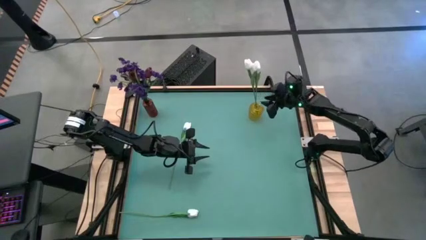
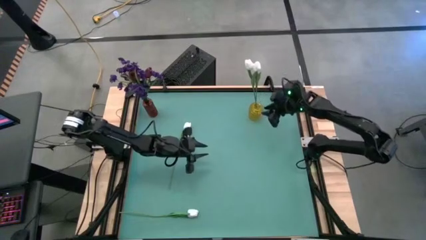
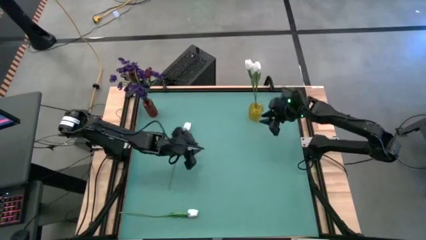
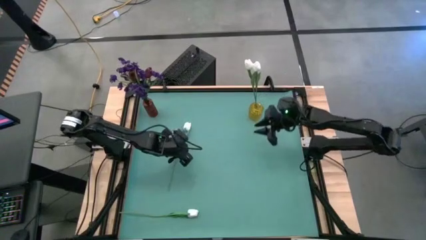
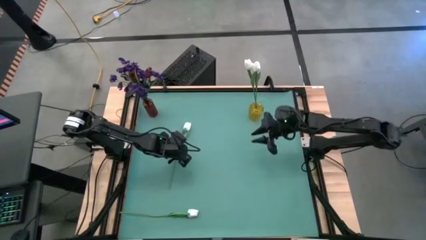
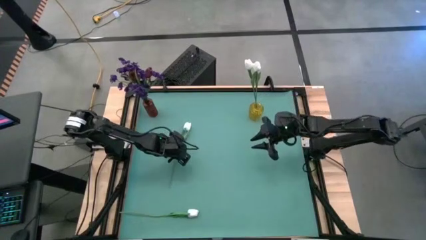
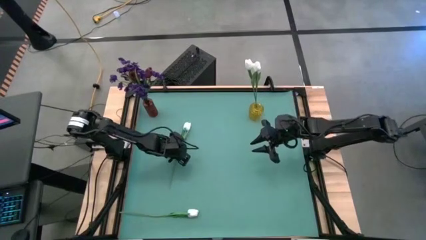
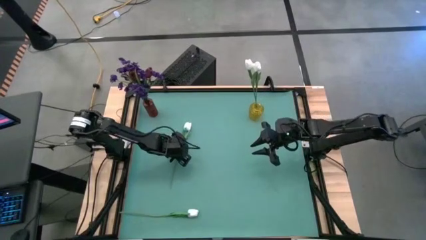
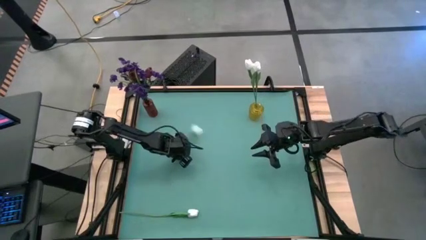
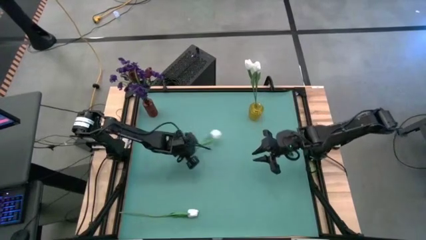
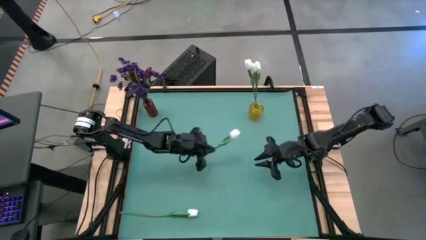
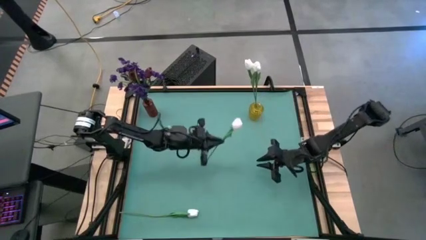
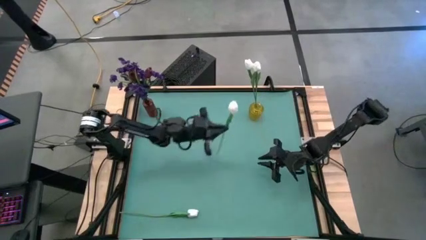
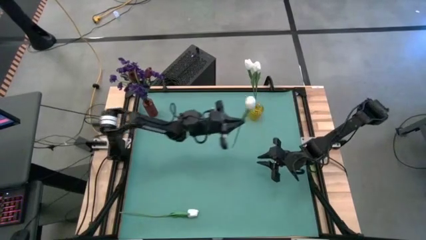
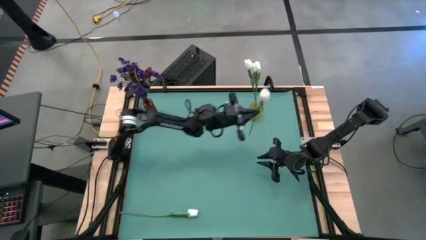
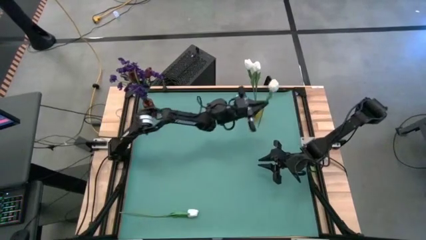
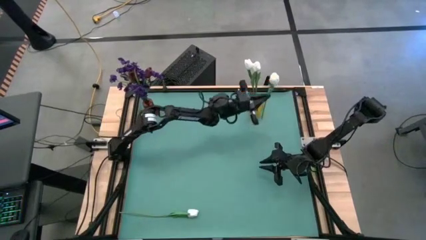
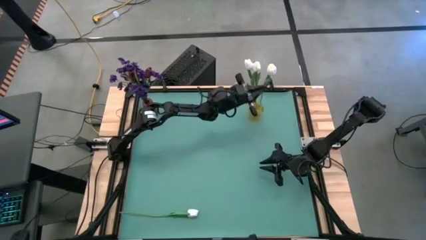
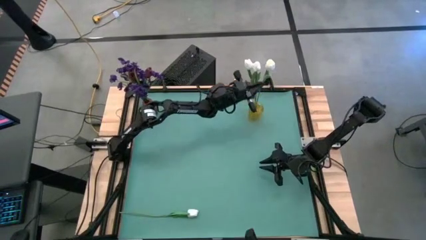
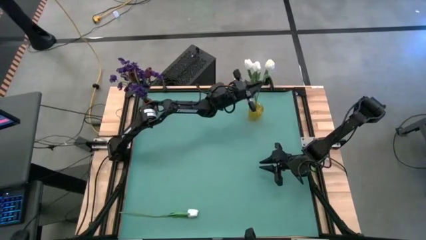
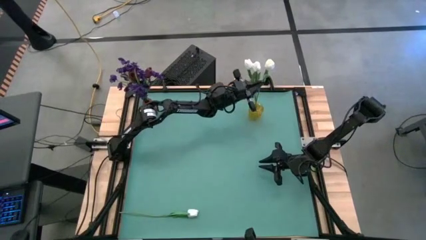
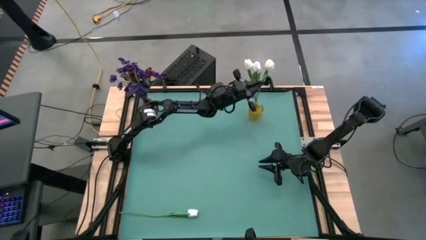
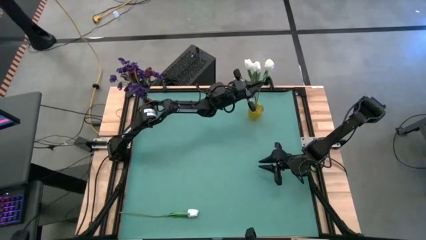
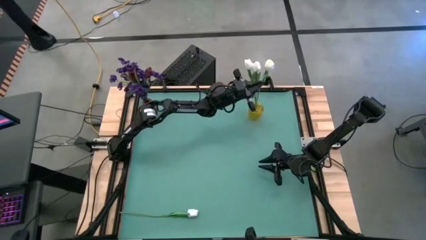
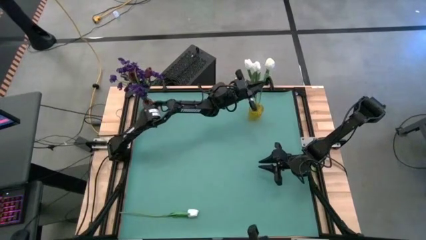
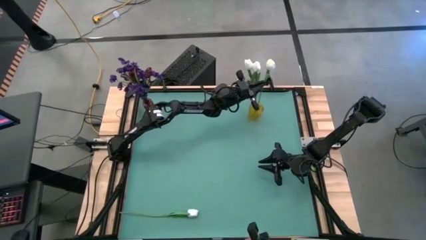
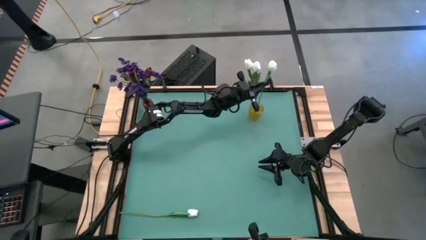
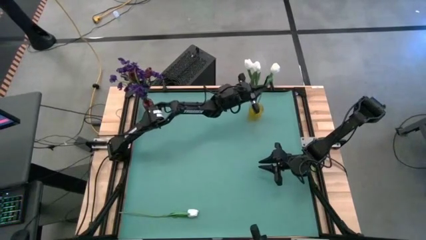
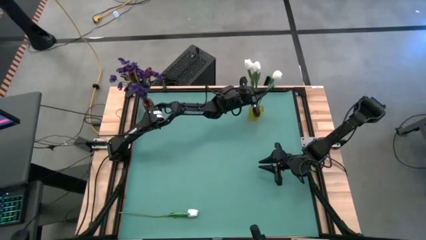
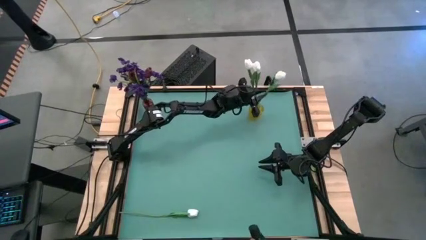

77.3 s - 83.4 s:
Task: Sort flowers into vase by color
Put the top white tulip into the yellow vase

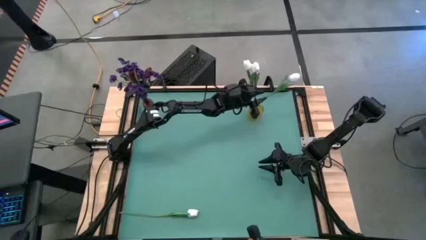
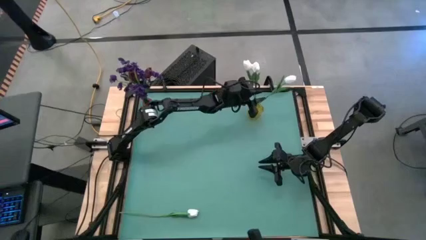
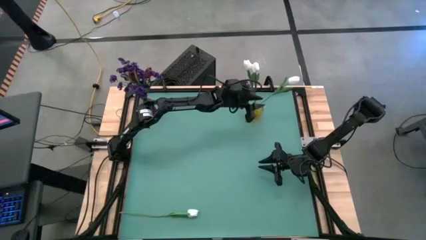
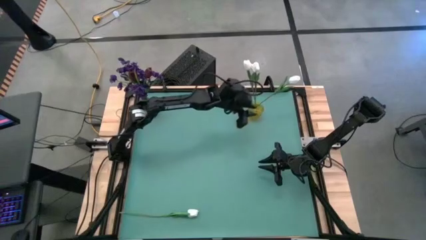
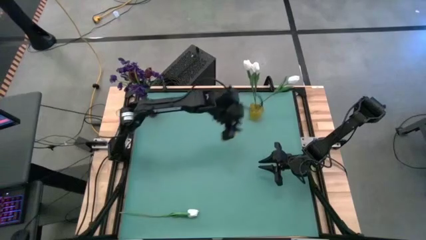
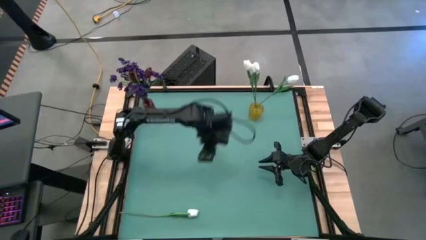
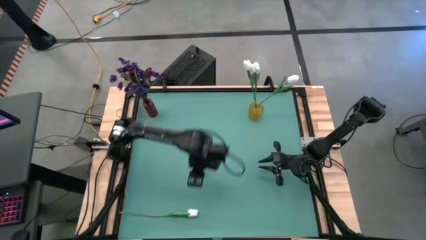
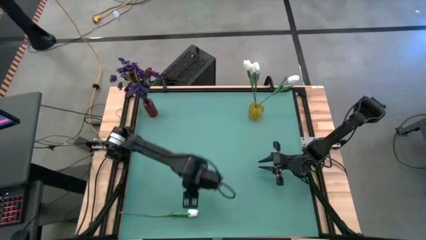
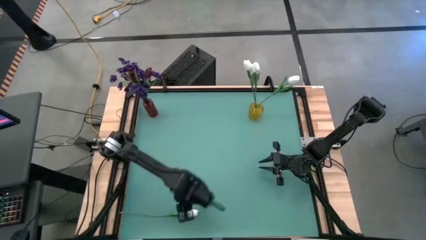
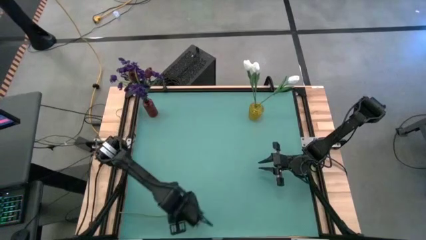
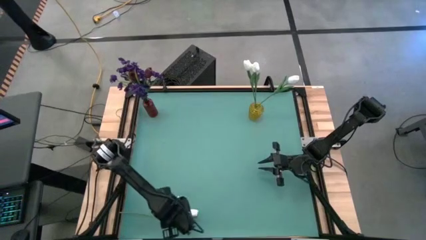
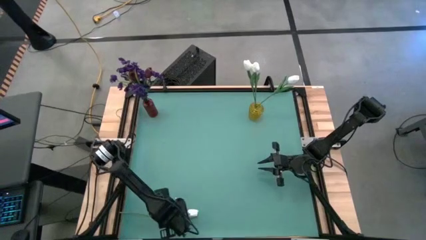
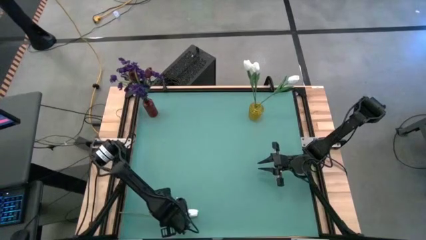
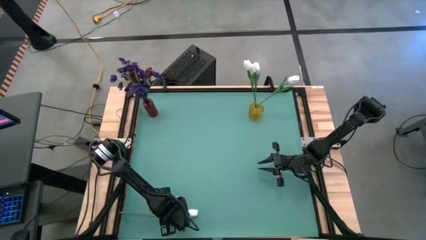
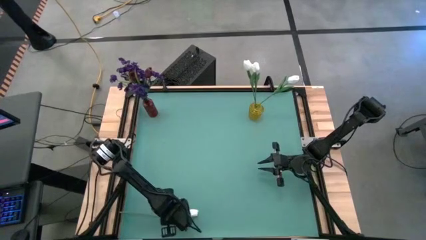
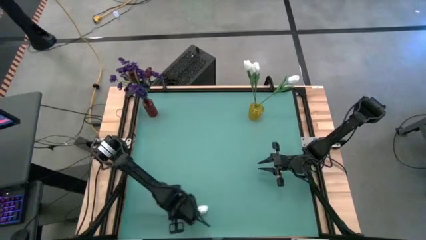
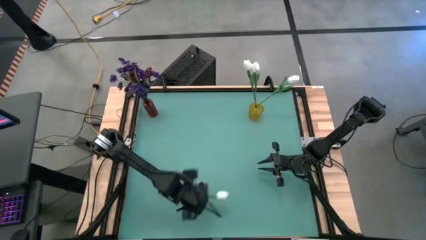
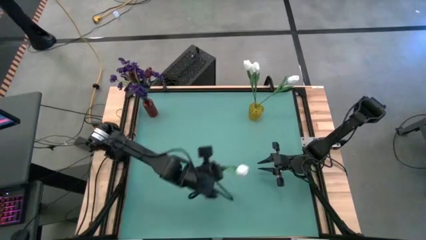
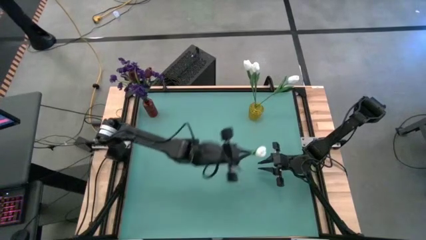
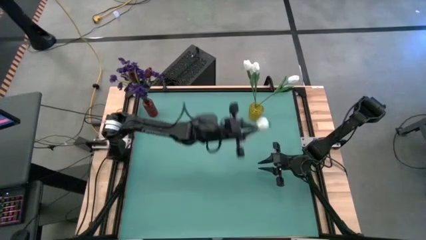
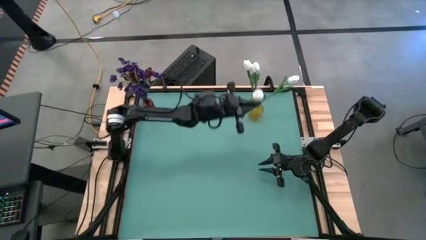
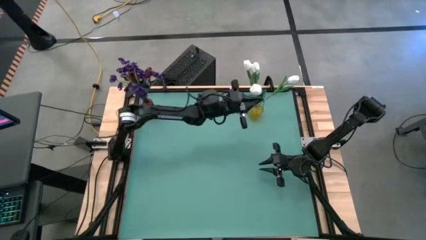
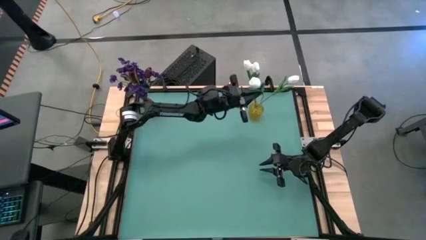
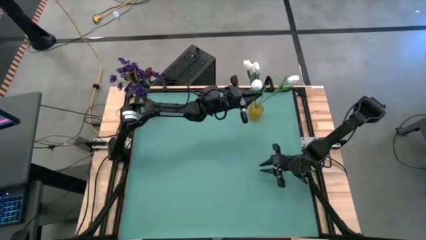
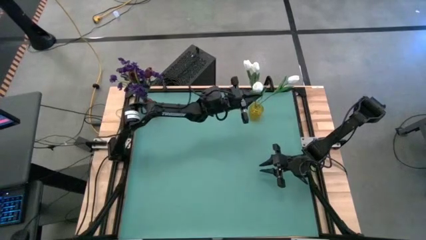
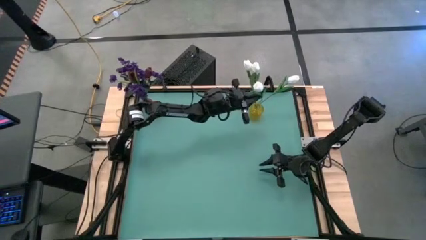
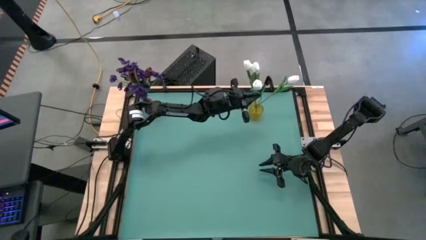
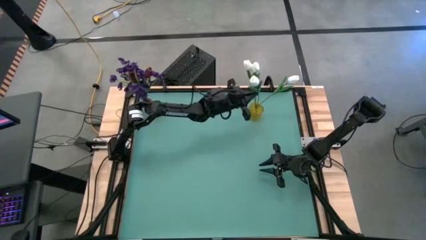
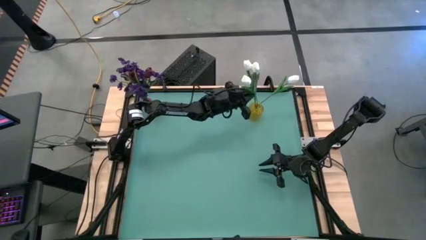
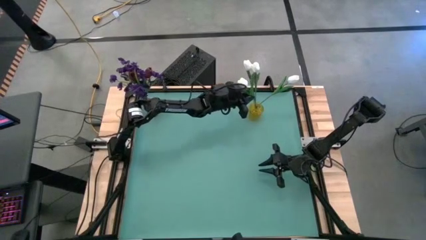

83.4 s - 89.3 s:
Put the white tulip into the yellow vase

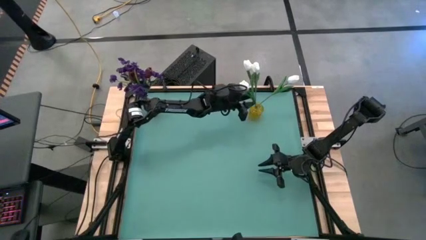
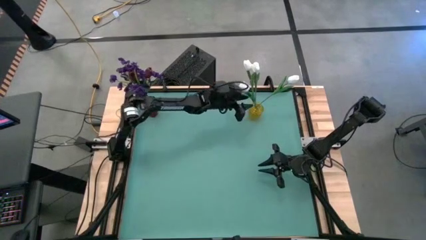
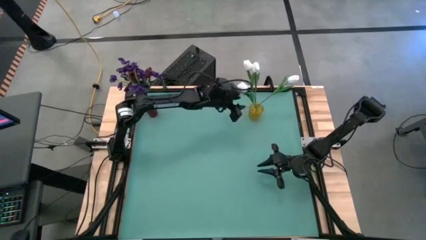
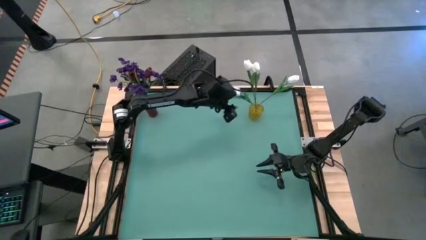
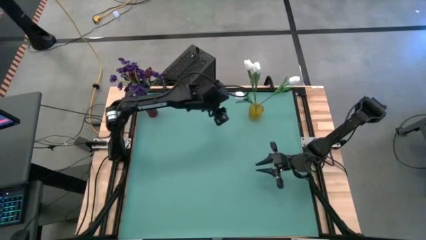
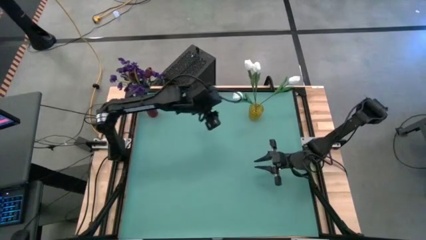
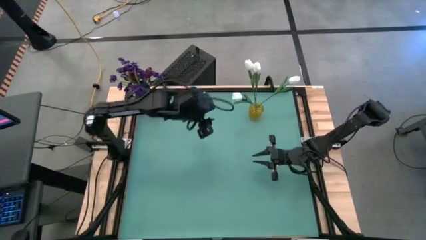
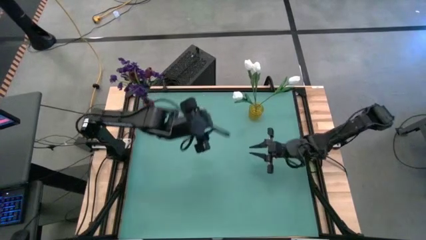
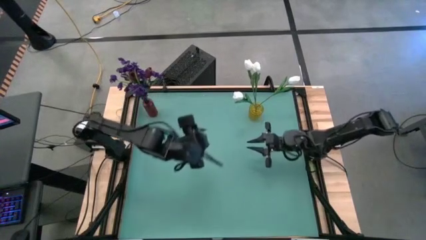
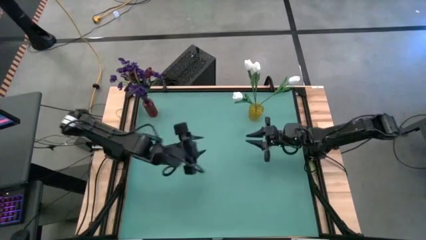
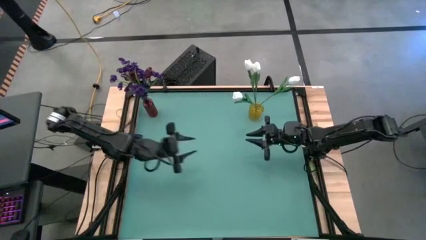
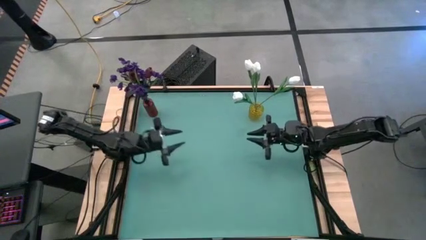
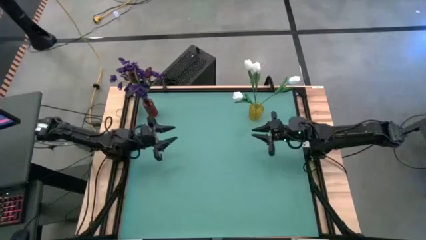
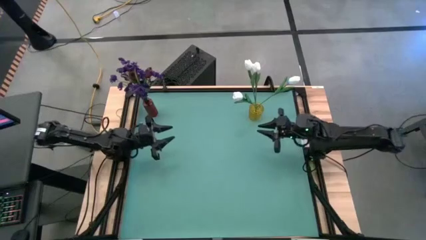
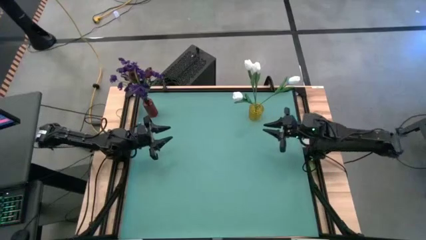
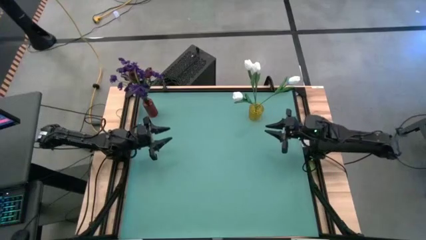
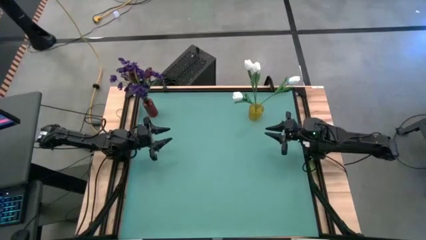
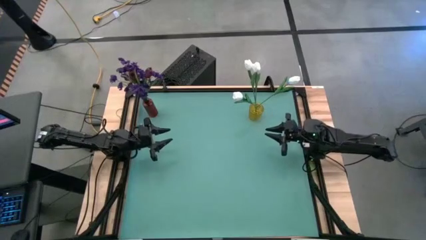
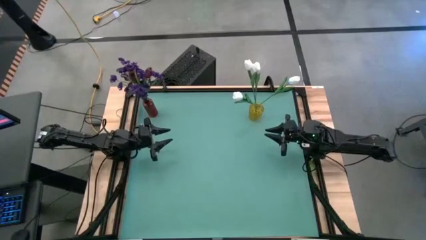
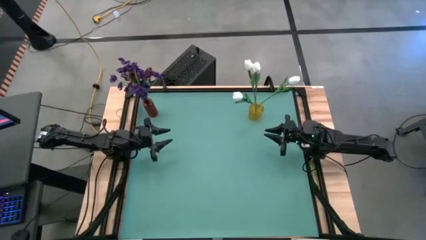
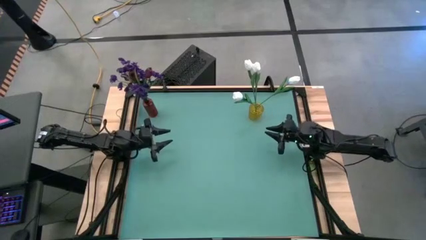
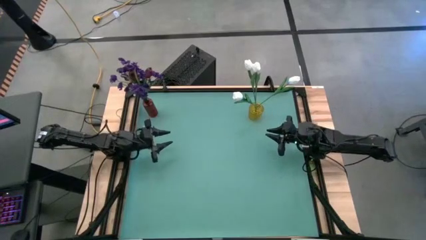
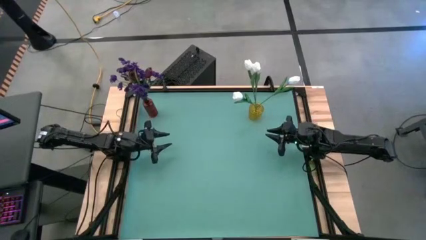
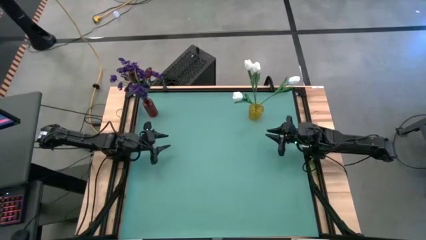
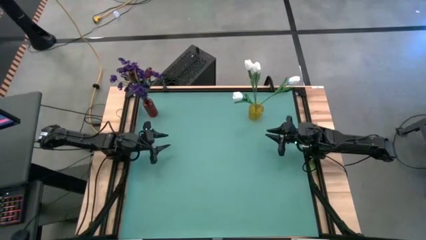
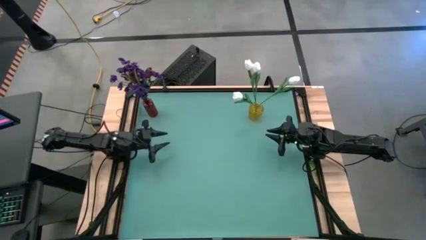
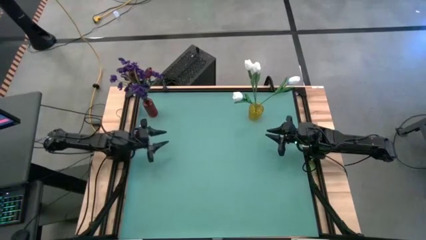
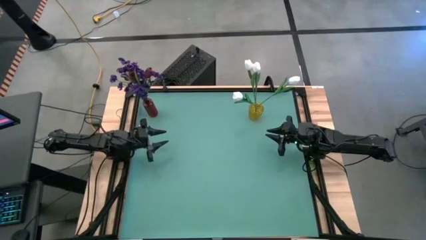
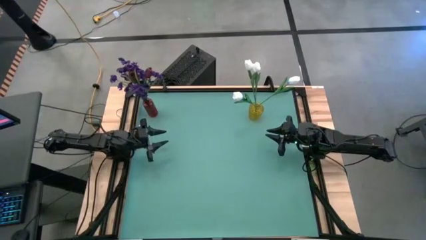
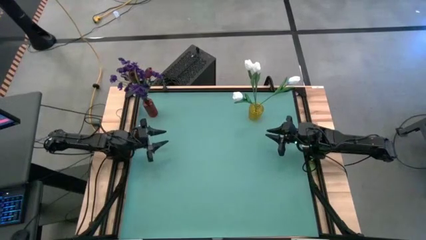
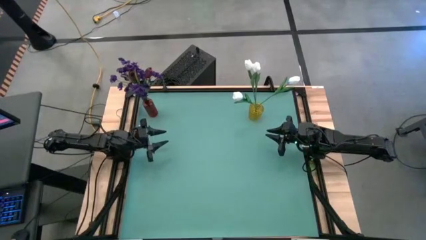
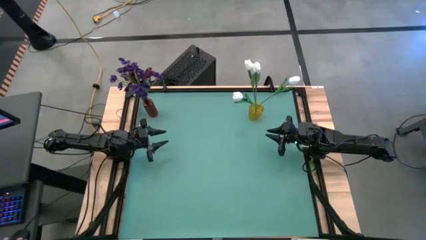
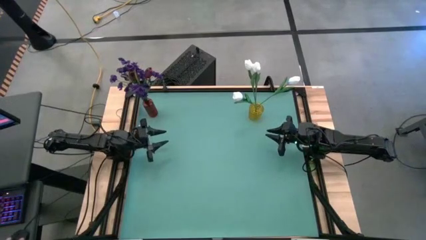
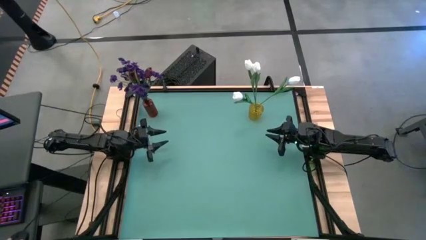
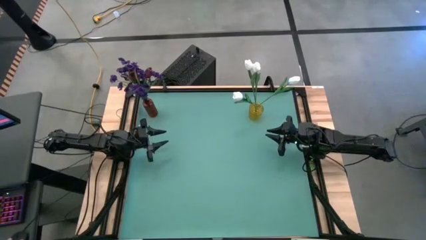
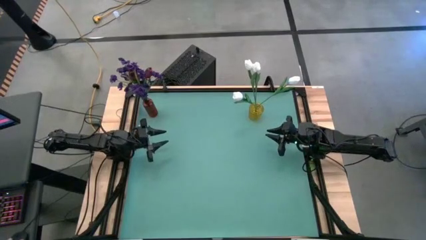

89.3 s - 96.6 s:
Return to Home Position
